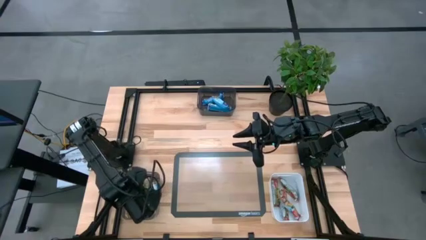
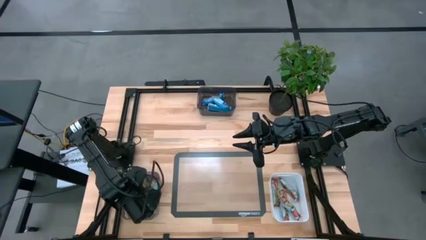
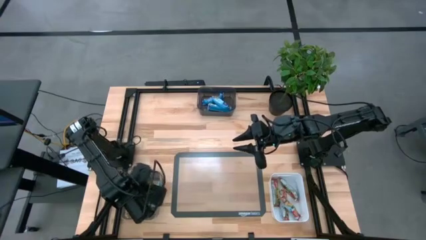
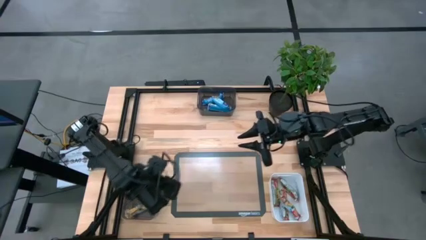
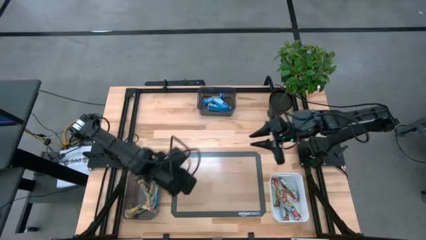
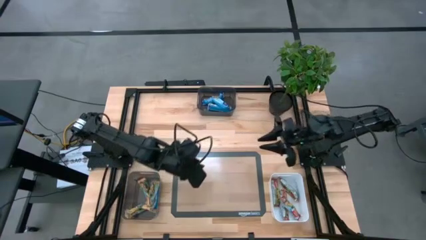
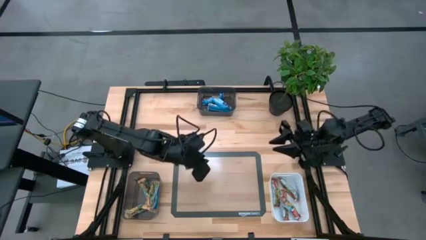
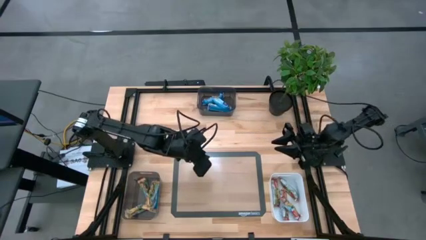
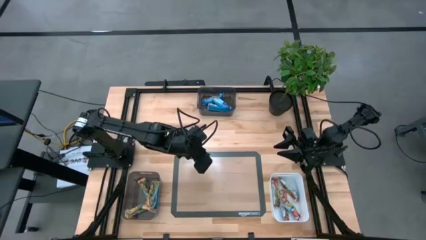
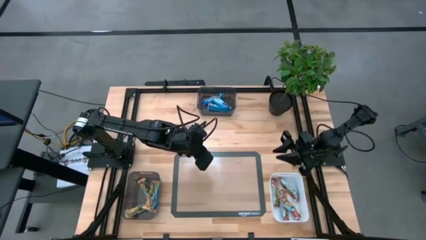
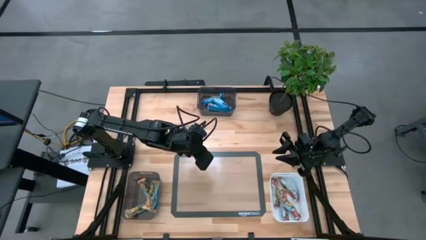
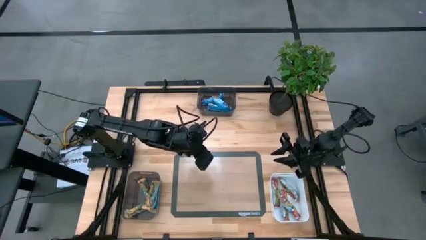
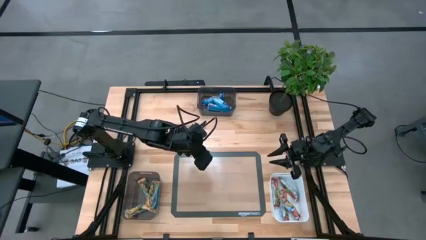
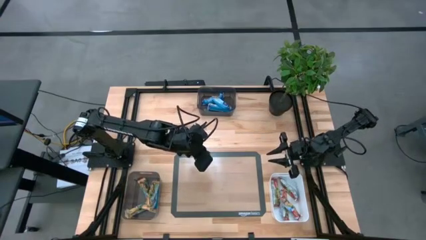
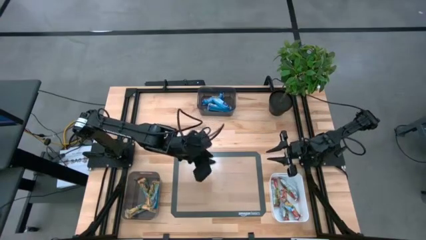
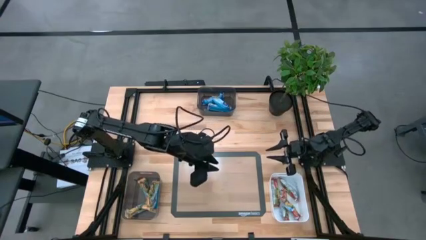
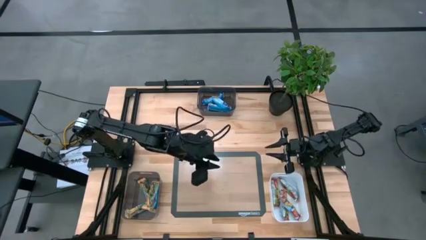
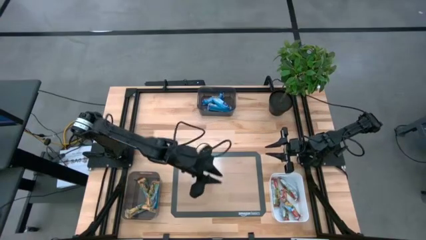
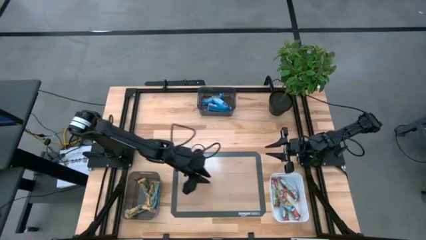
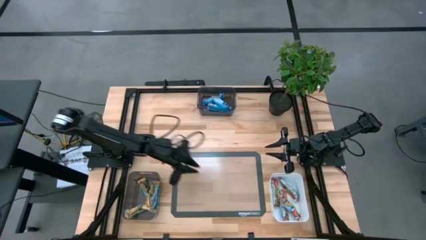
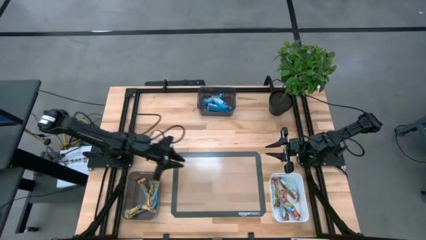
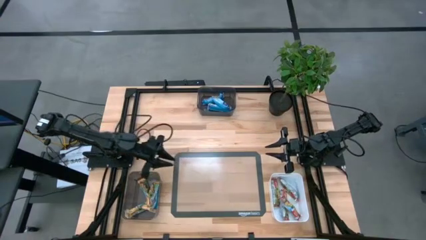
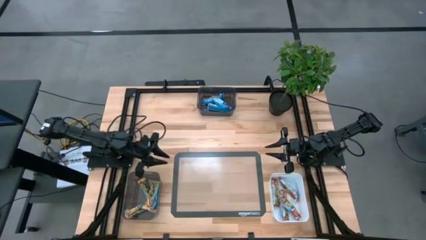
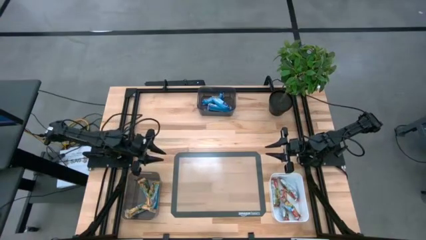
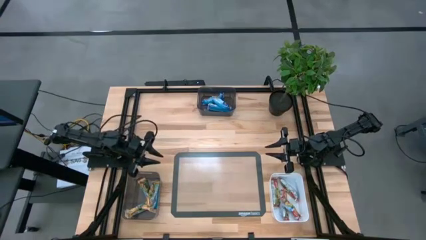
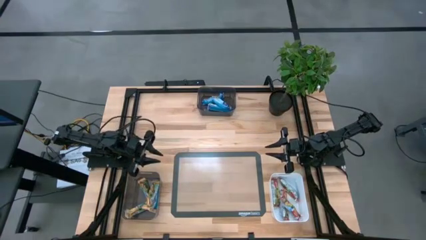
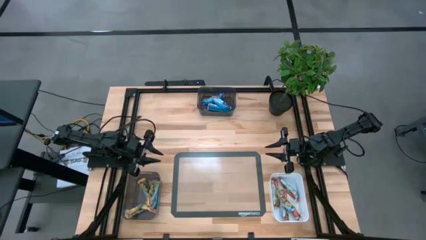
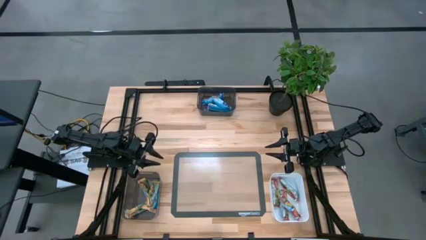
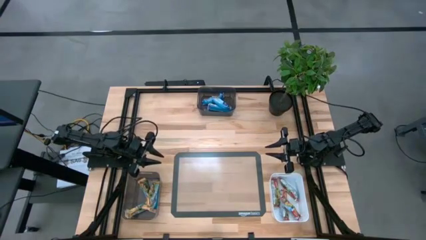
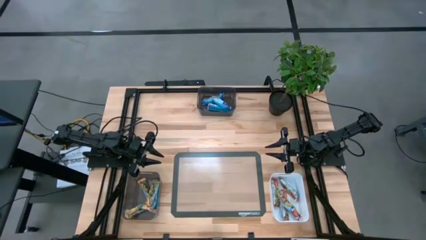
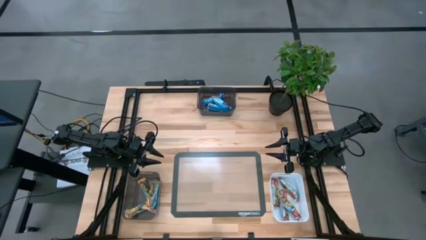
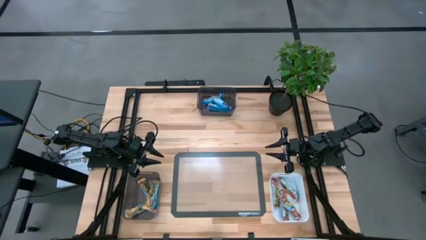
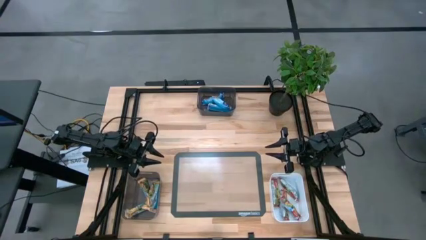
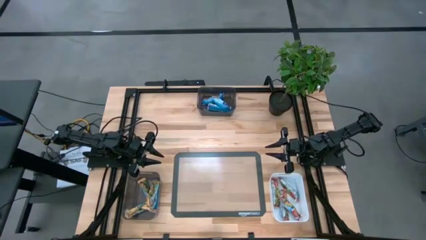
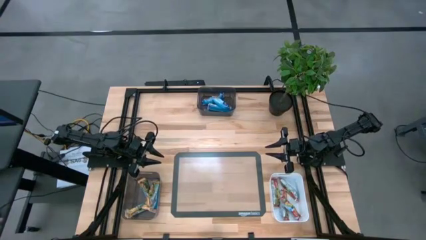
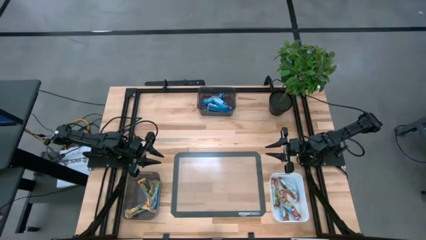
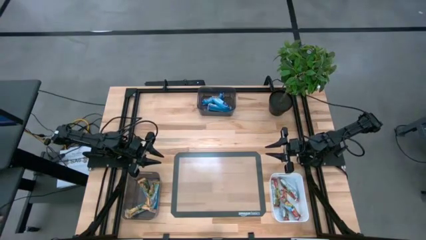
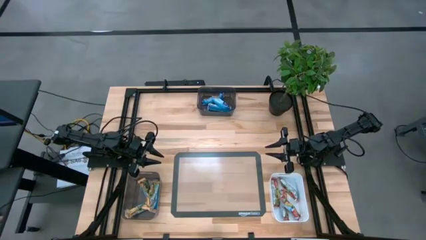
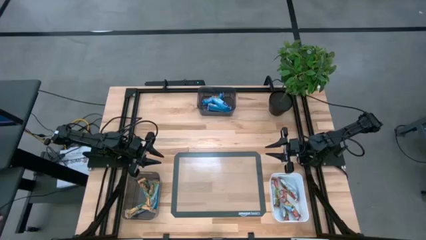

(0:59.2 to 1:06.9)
Task: Pick and place Granola Bars by type
Return to Home Position

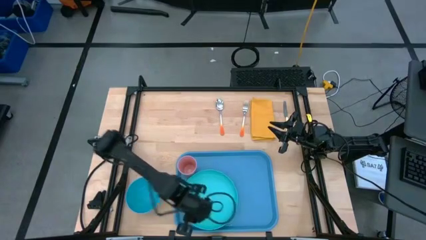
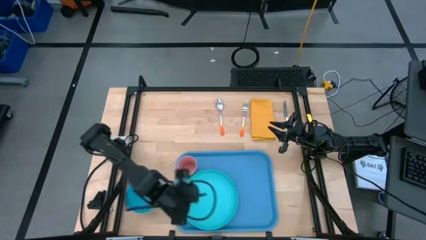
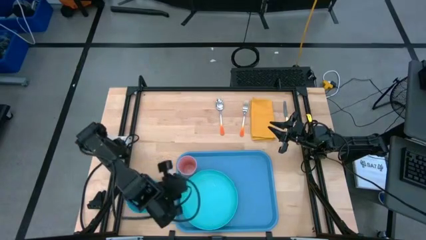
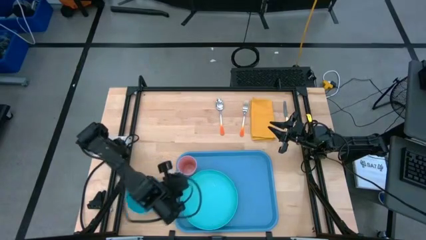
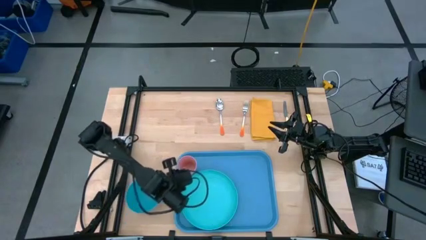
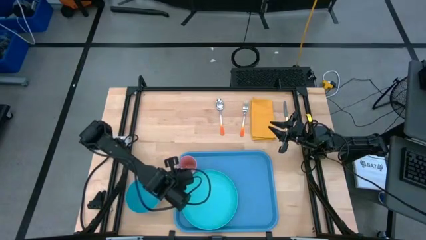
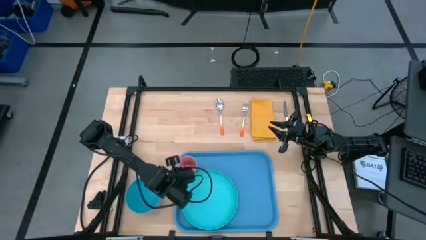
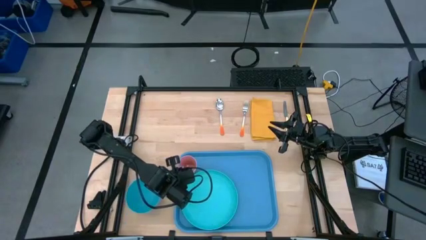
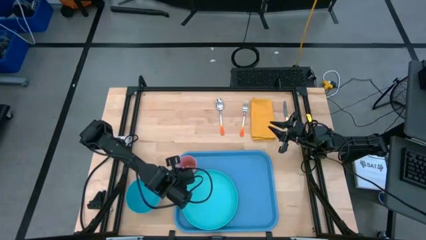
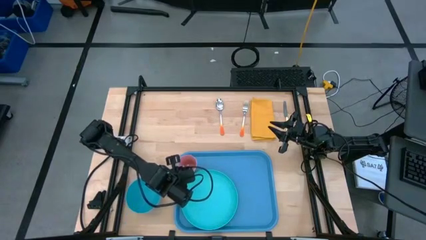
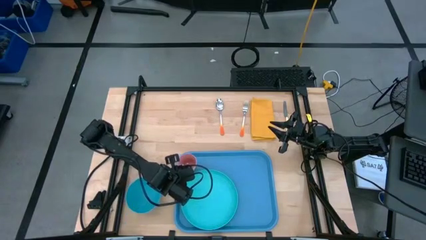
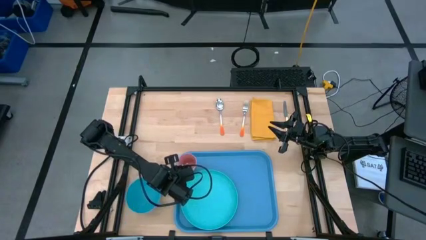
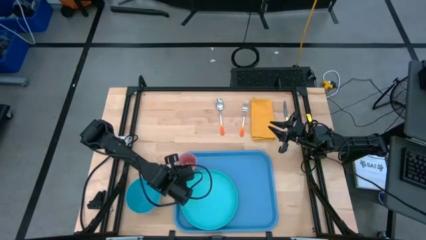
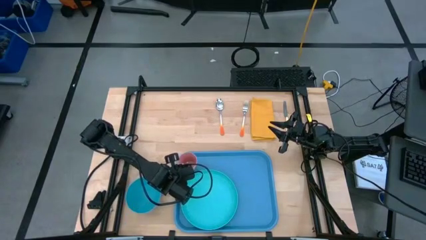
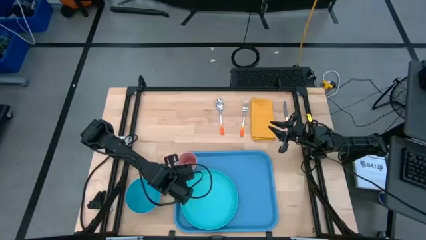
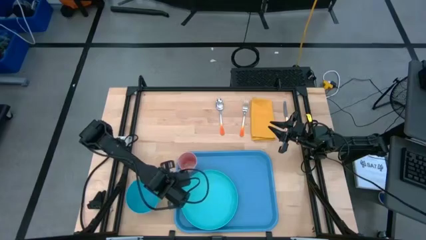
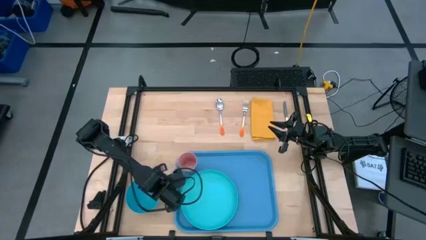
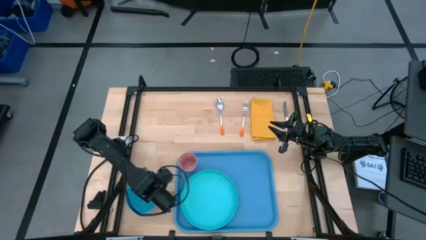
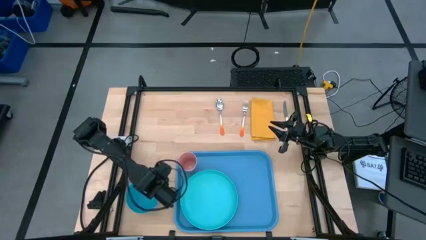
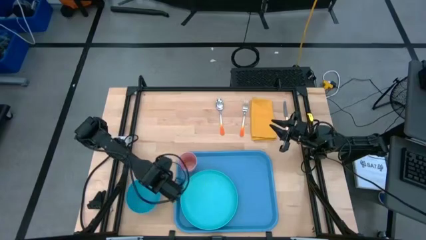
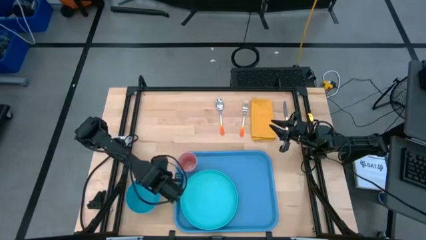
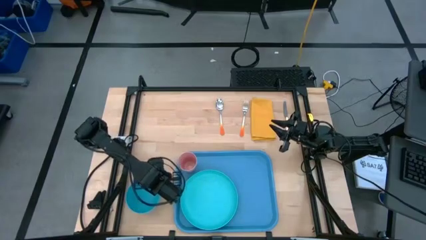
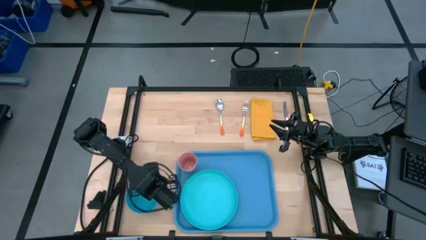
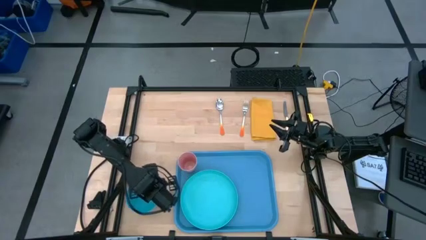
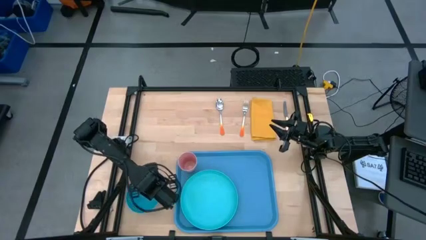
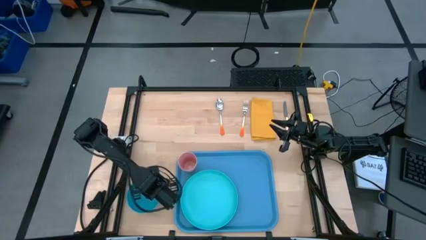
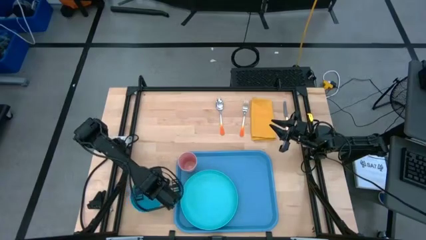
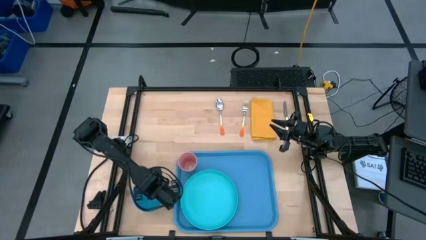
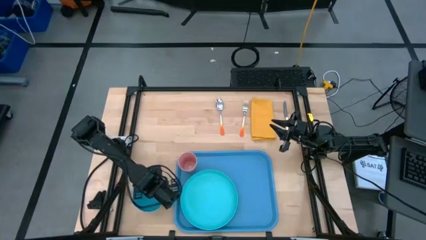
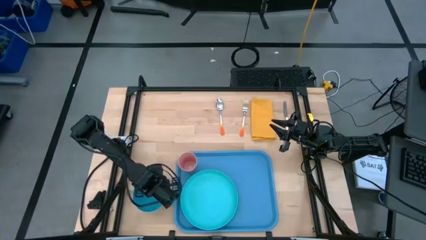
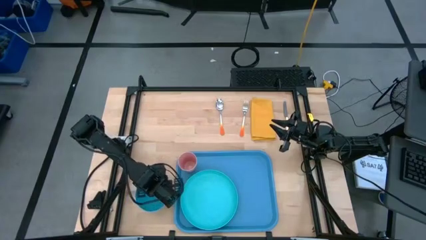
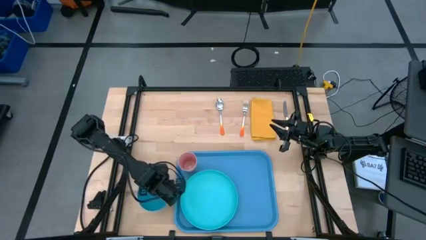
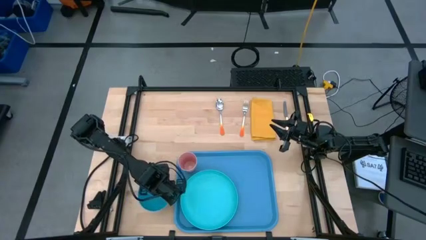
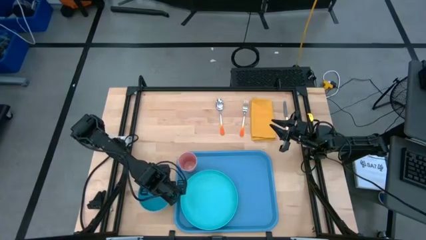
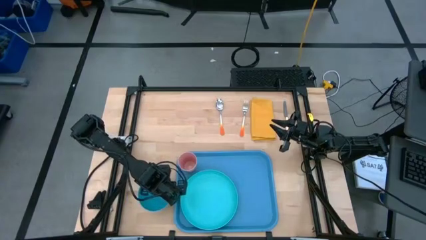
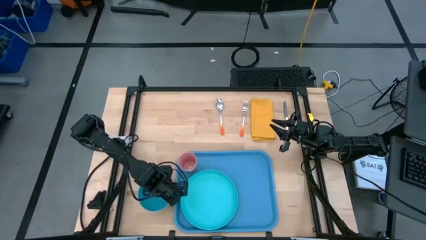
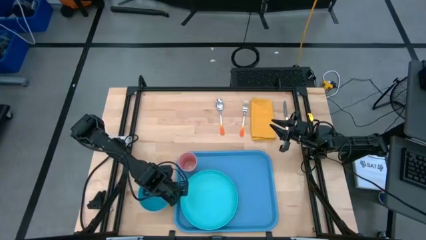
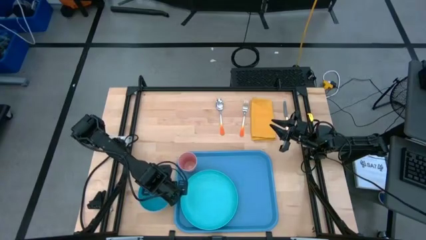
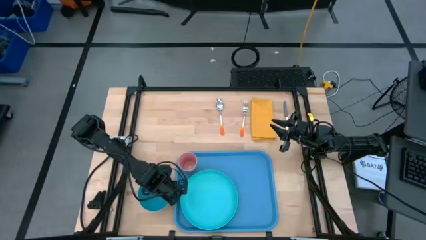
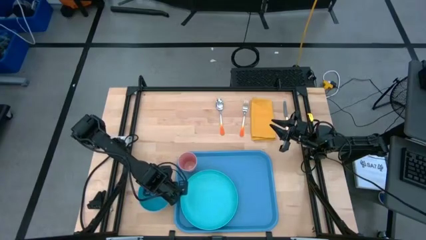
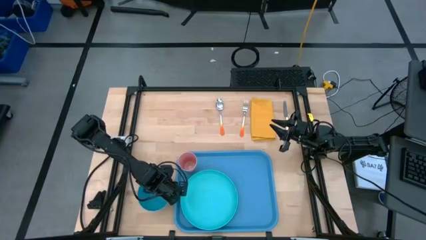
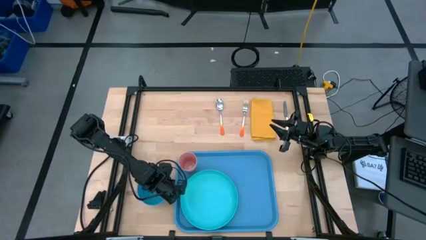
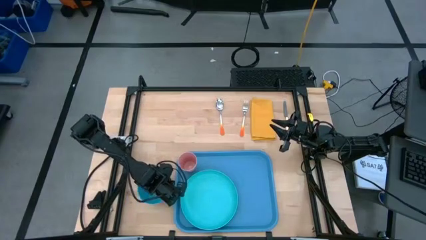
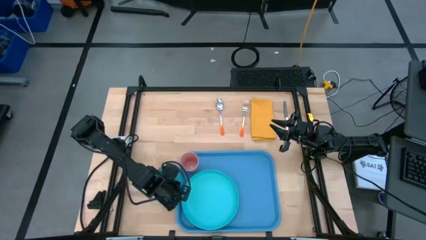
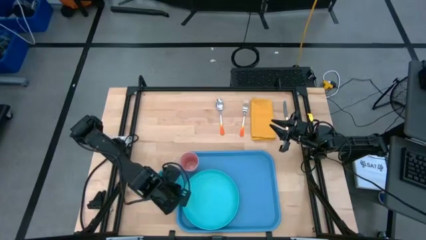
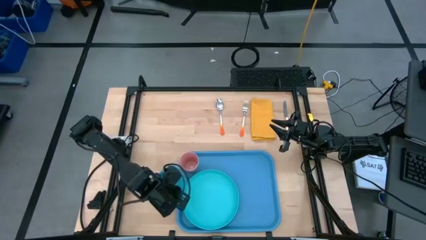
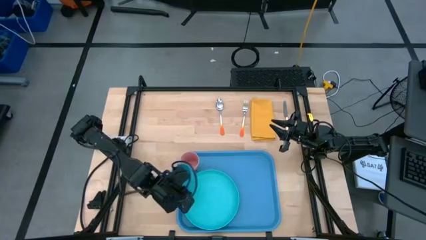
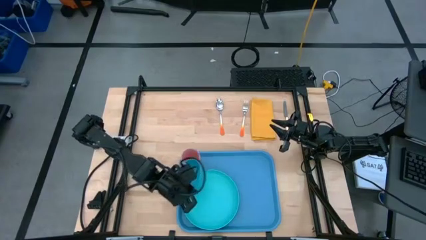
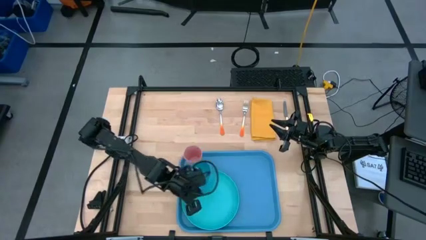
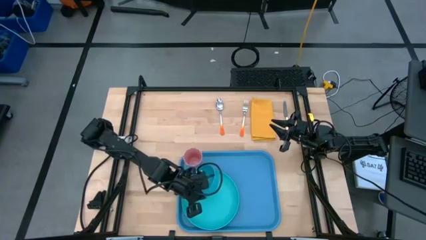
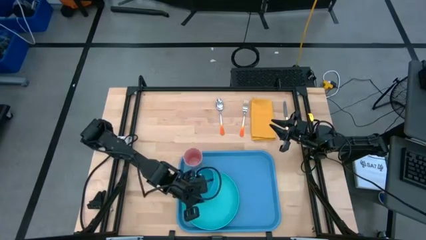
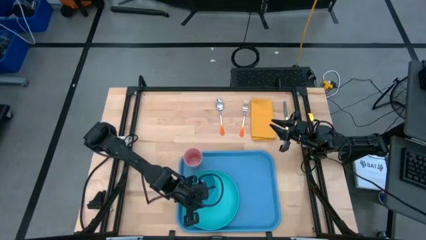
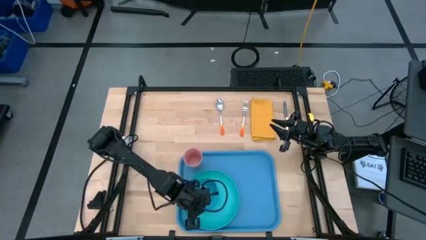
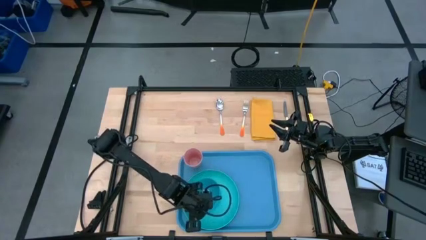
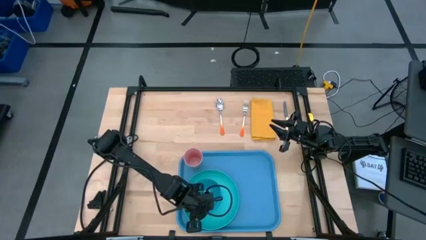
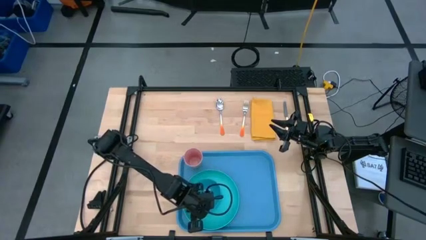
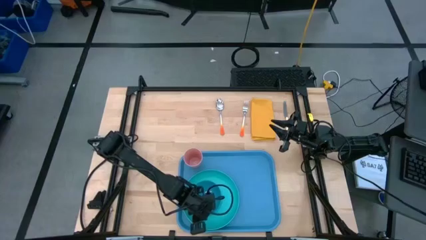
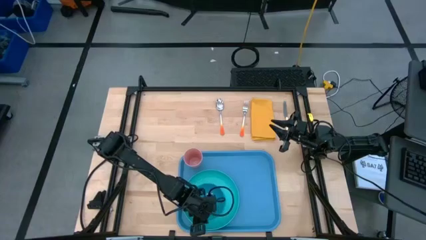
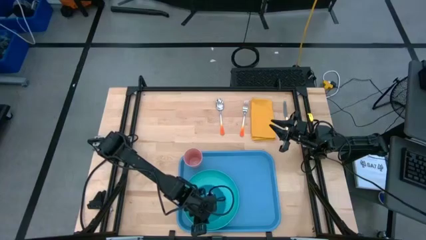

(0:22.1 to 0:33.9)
Task: Set up tray
Stack the blue bowl on the light blue plate
